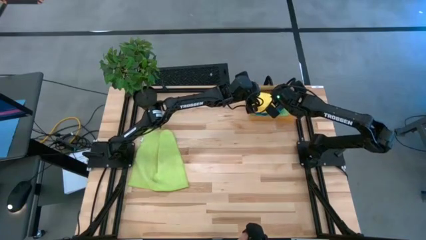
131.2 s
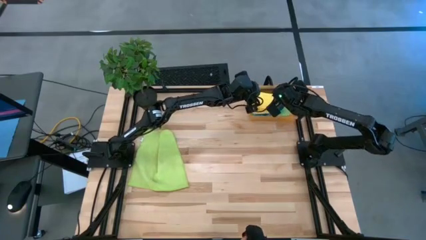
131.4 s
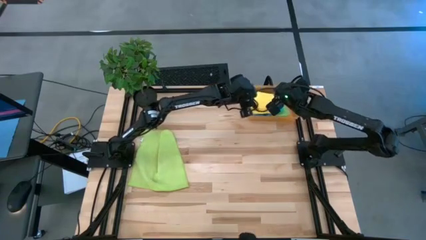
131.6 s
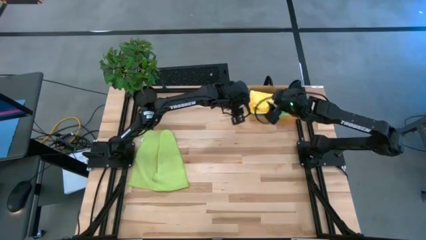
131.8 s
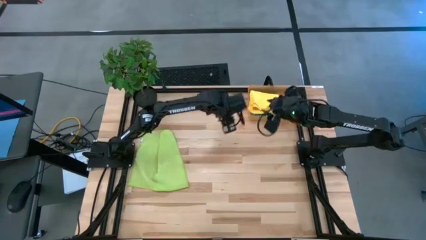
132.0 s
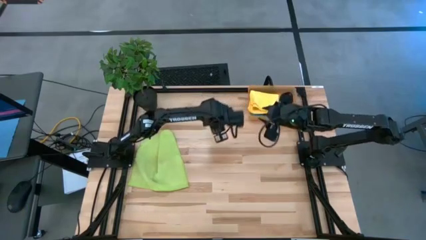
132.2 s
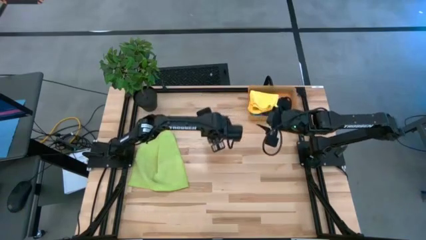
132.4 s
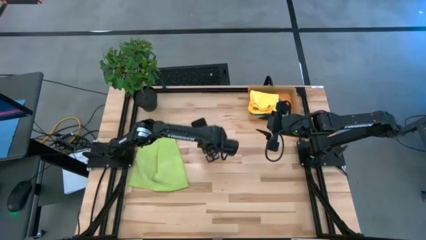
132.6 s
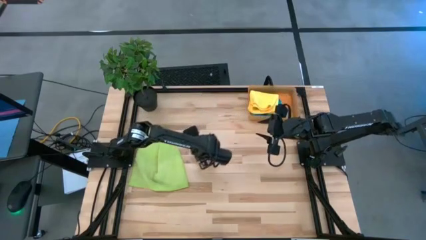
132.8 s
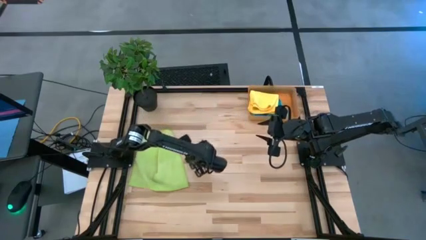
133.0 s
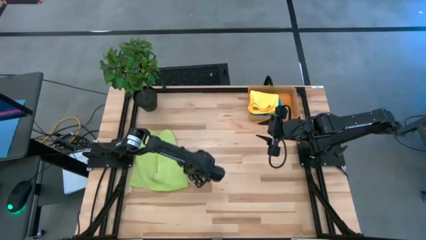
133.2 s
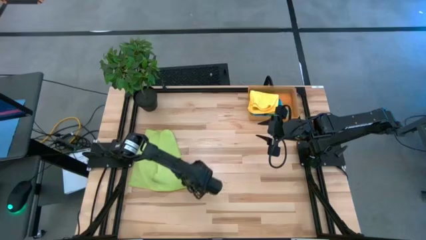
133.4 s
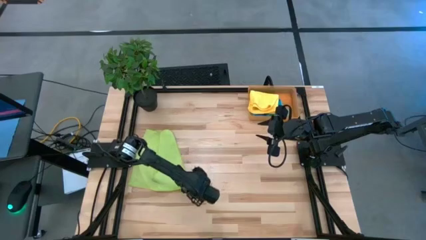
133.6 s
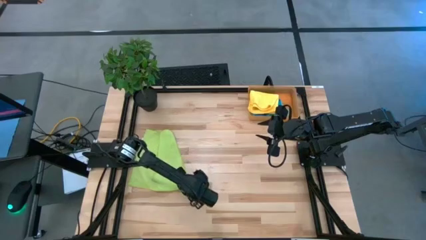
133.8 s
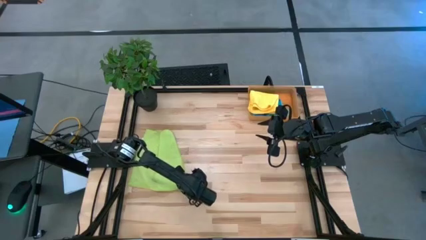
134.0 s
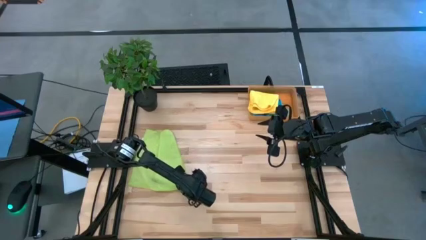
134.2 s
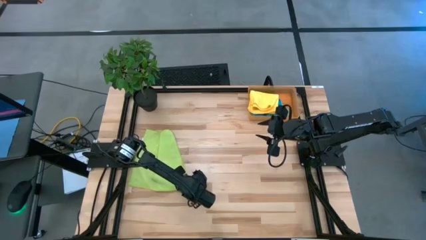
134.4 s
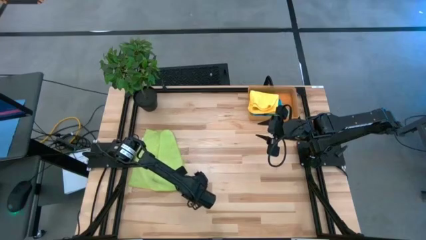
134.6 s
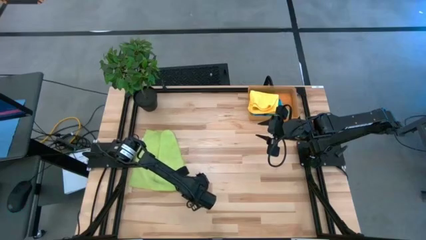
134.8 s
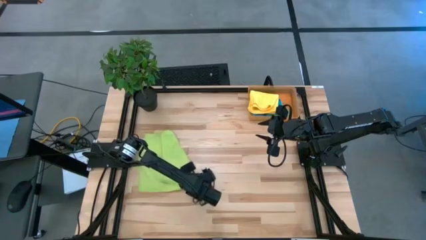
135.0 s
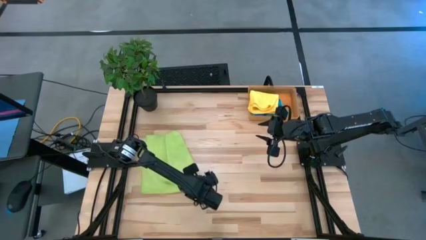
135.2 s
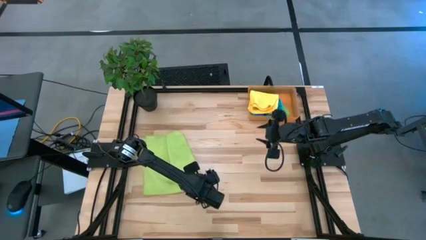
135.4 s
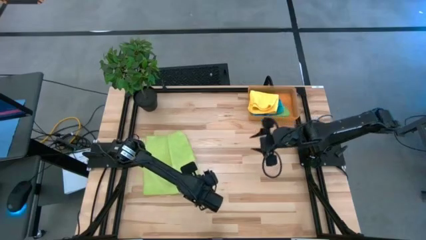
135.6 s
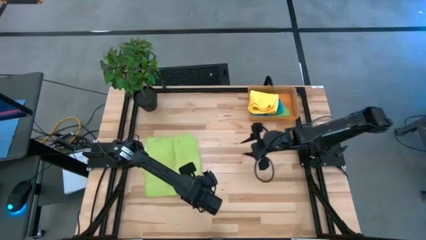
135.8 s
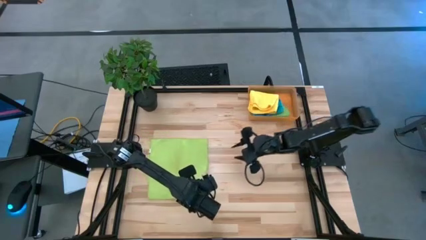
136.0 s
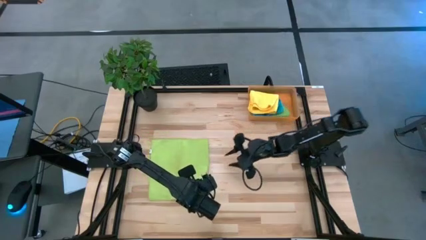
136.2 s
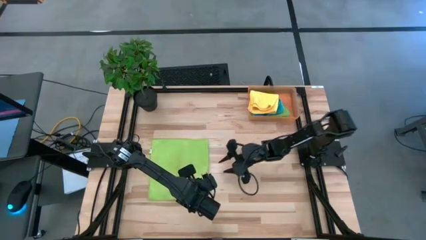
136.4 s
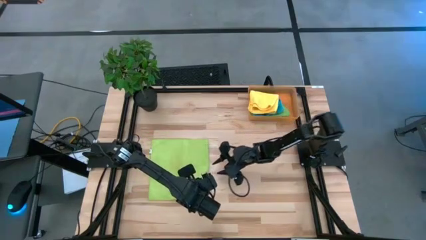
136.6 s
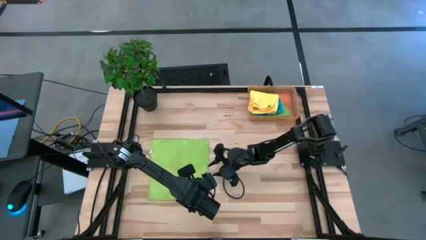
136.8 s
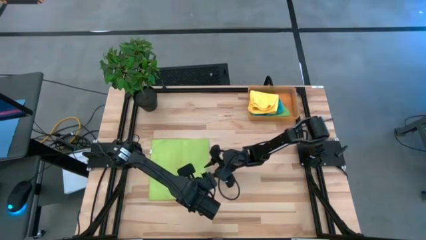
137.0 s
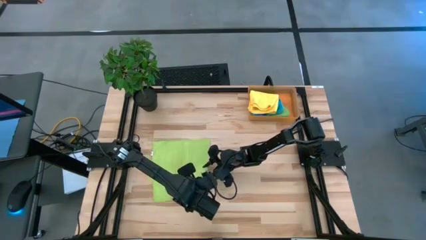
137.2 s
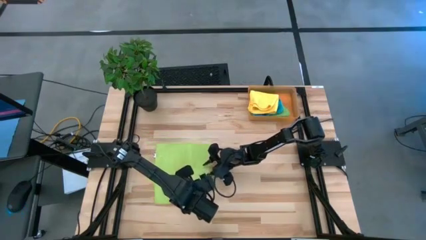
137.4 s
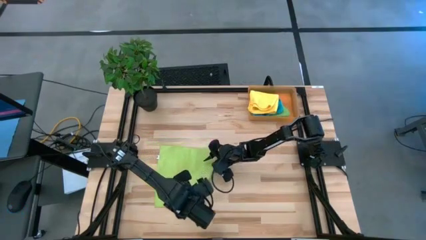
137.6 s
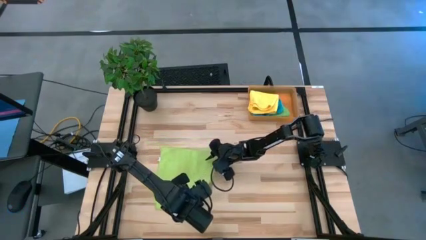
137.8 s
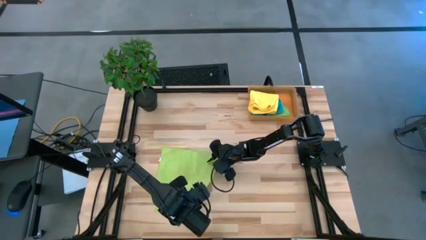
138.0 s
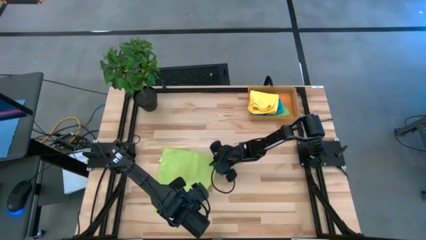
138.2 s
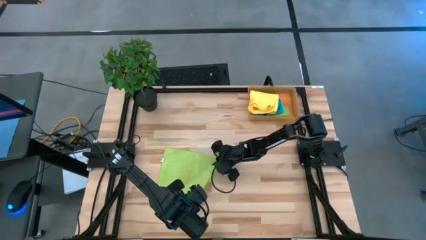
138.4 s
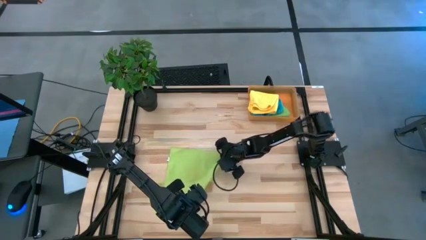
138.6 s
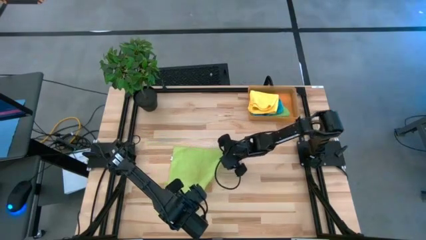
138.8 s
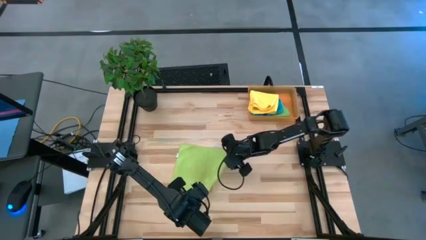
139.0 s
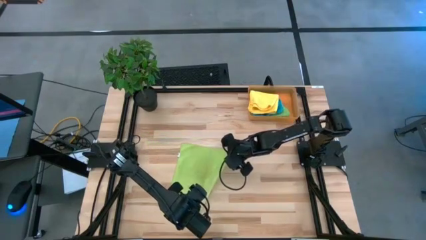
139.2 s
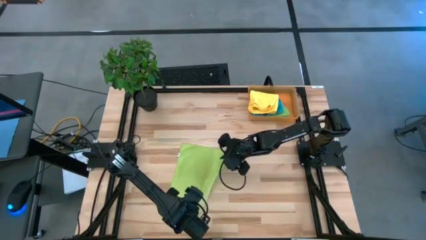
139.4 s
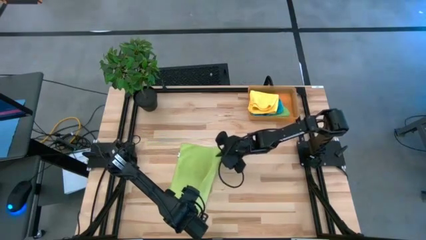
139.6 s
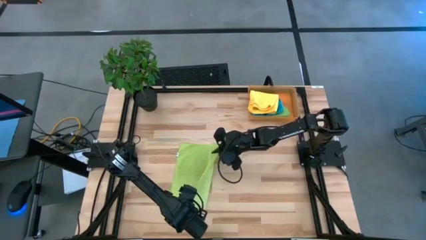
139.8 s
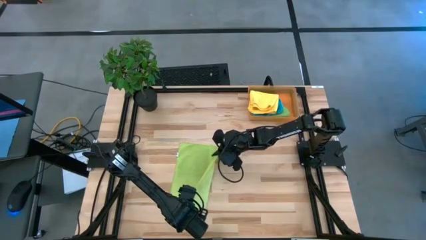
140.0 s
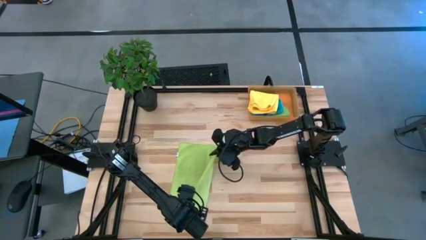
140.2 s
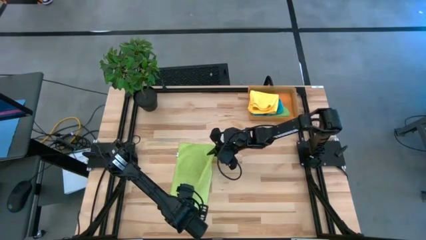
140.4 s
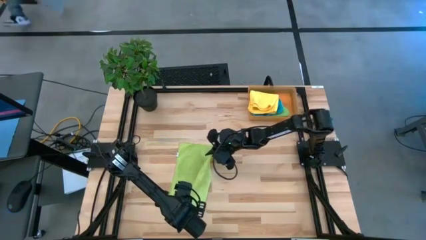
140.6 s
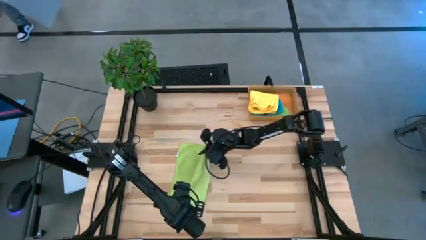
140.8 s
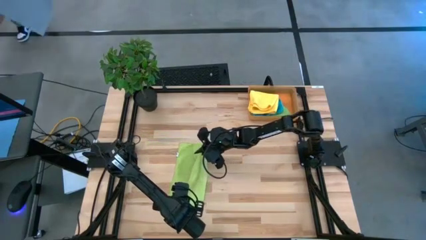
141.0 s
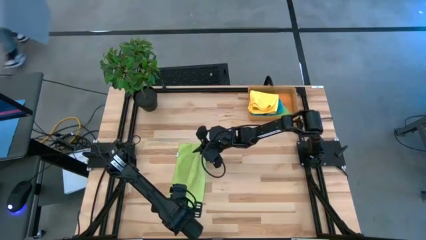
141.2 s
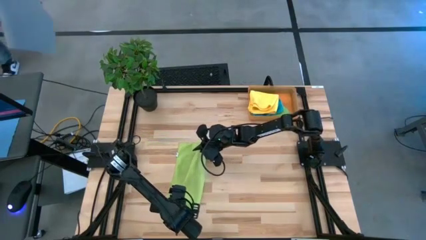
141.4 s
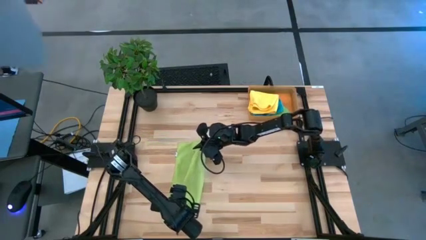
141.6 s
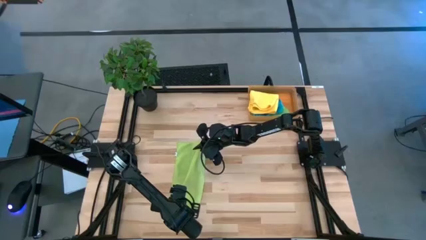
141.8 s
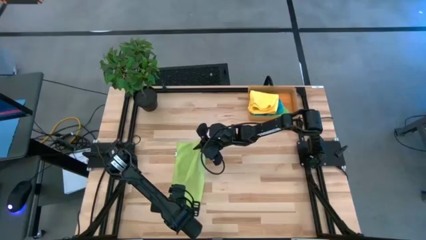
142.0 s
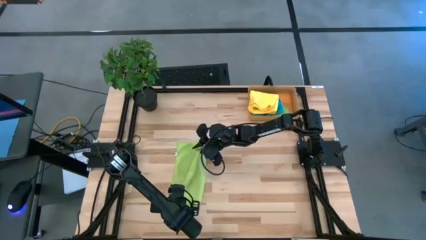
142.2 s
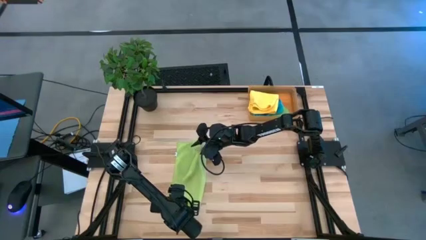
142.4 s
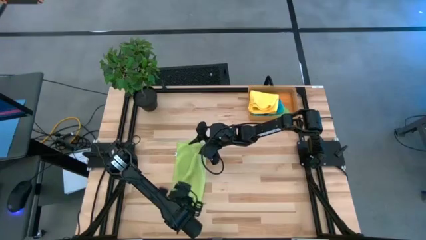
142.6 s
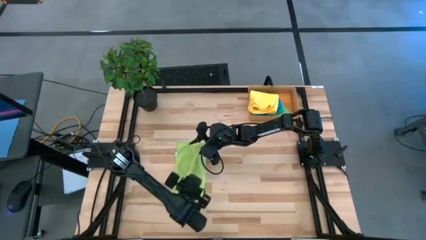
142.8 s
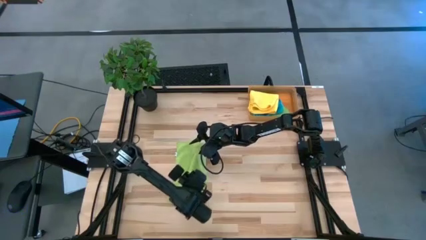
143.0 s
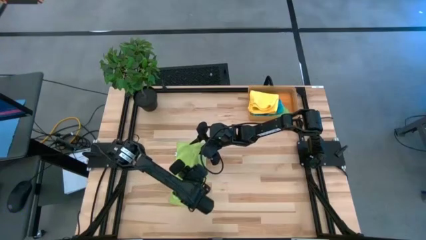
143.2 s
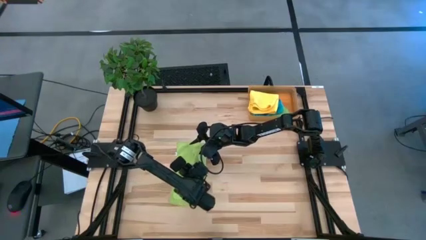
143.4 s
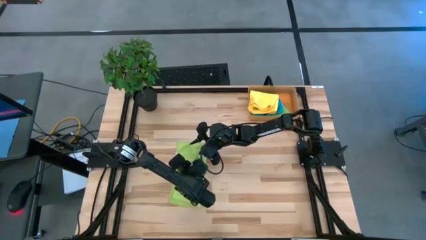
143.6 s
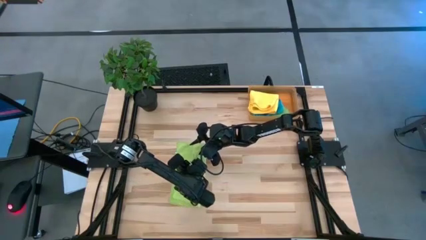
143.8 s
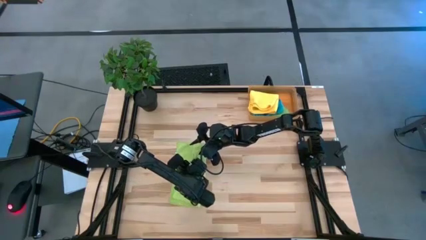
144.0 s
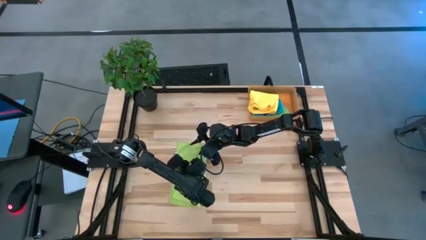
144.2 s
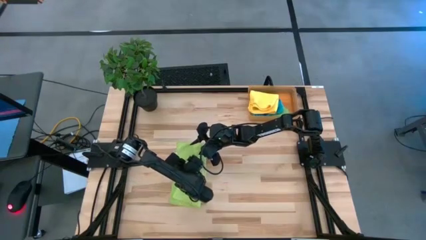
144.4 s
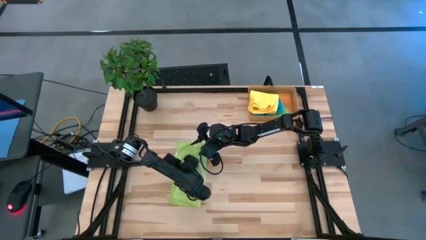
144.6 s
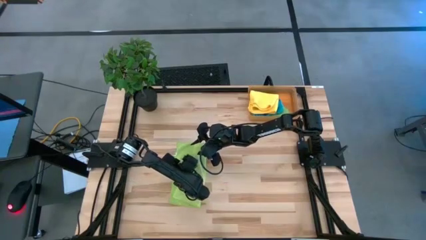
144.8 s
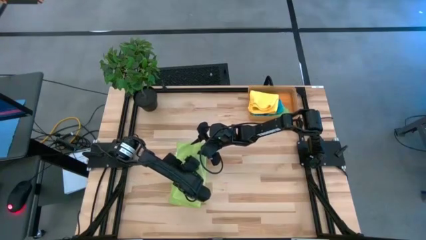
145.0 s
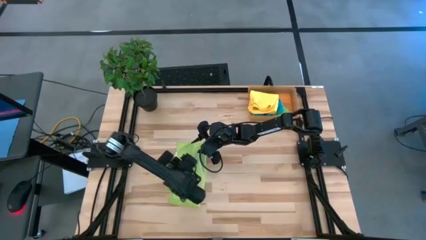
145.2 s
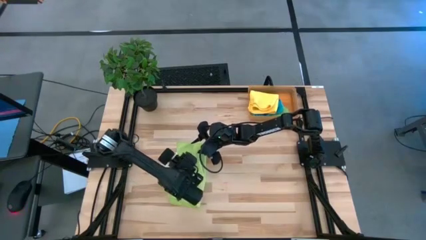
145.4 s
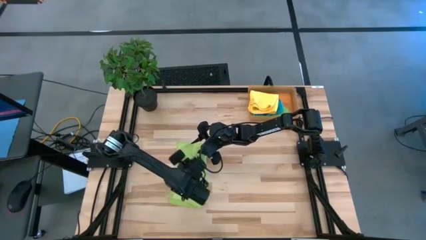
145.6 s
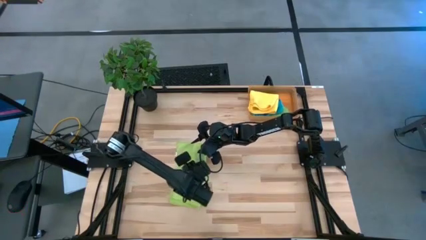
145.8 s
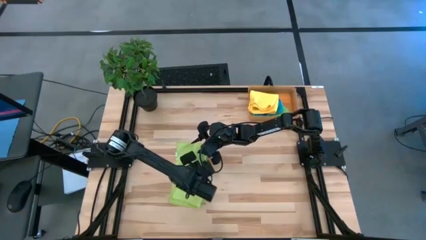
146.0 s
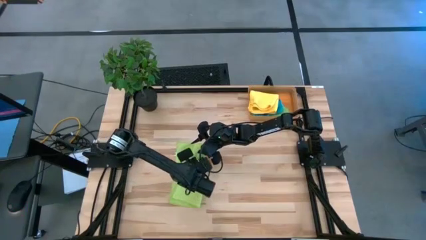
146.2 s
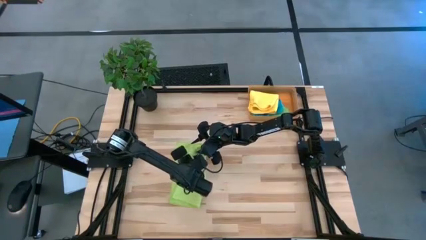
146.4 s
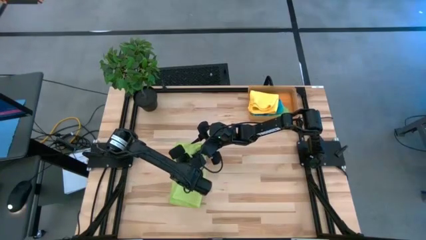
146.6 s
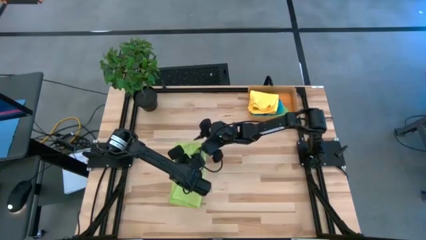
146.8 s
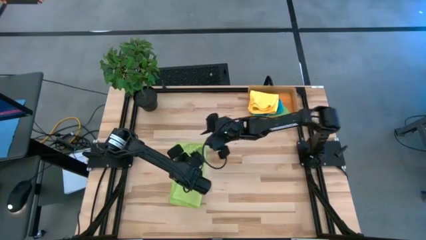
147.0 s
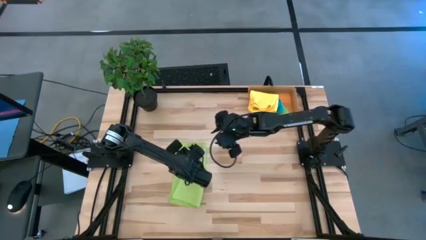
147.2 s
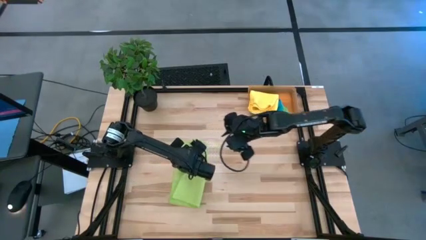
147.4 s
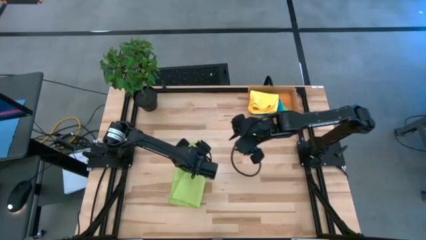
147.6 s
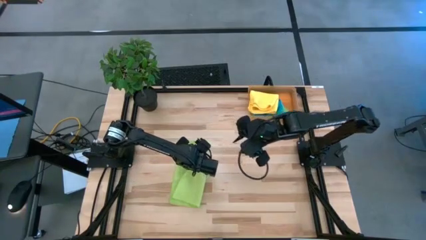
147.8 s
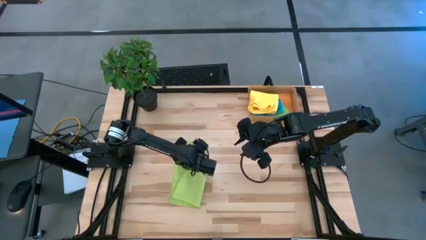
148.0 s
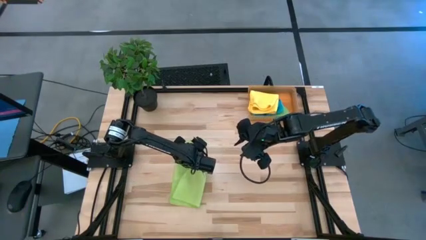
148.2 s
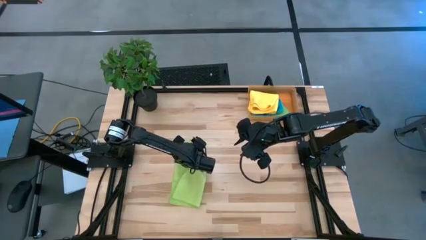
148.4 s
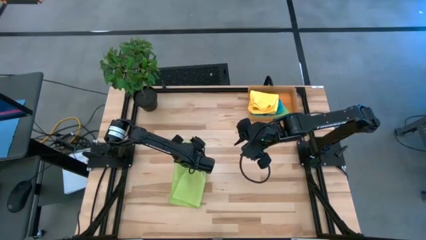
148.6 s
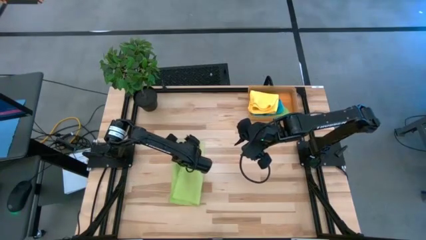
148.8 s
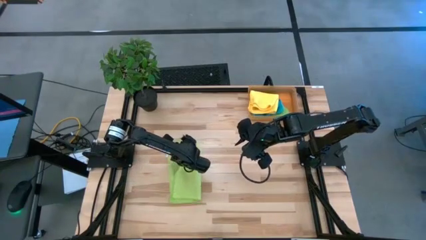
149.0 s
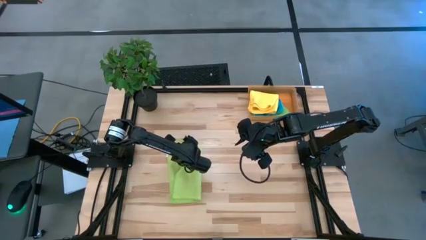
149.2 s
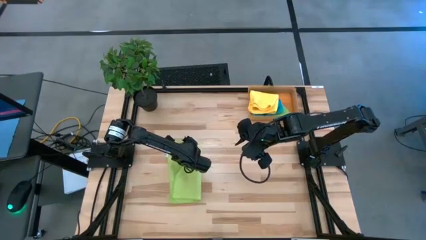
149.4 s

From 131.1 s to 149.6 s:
Task: Fold microfiber towels
Fold the light green microfiber towel
